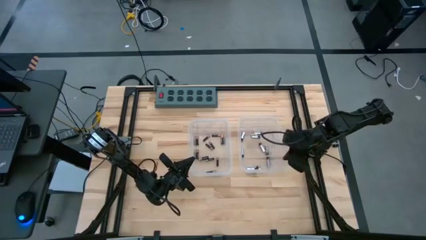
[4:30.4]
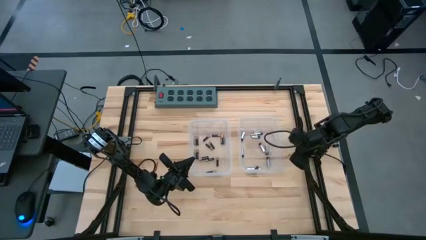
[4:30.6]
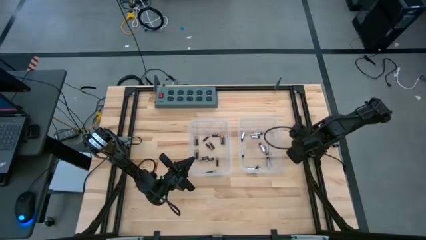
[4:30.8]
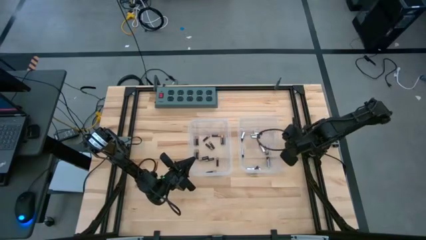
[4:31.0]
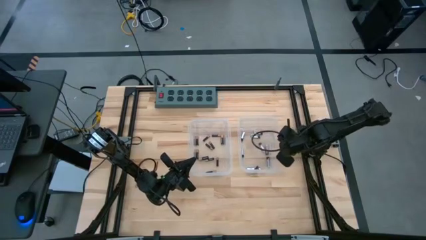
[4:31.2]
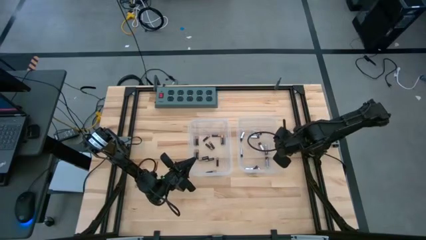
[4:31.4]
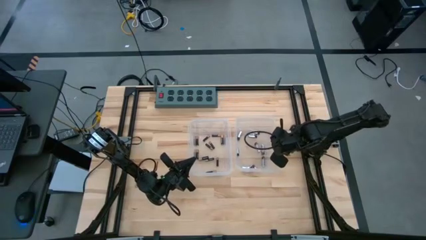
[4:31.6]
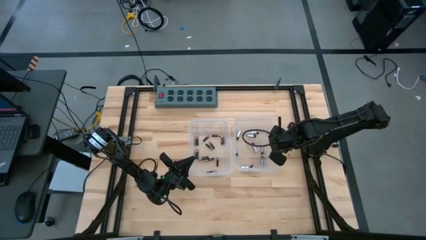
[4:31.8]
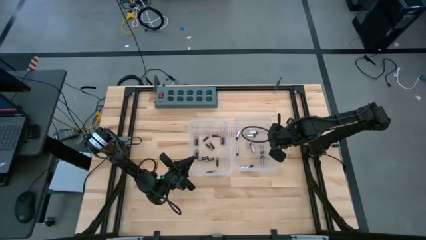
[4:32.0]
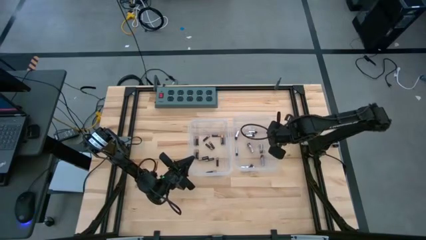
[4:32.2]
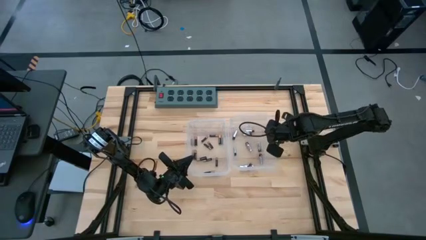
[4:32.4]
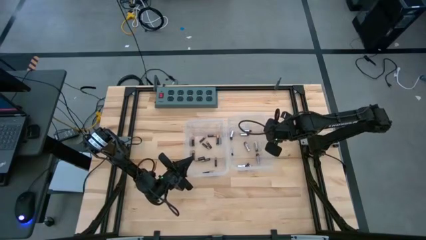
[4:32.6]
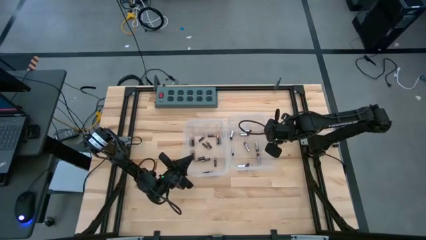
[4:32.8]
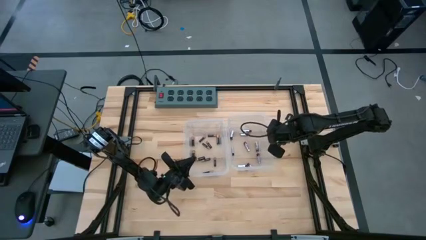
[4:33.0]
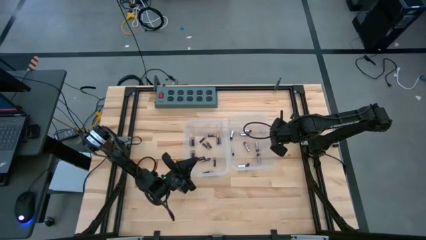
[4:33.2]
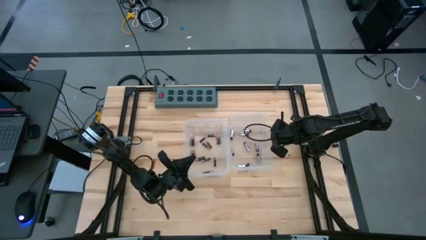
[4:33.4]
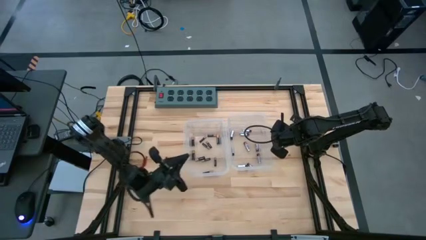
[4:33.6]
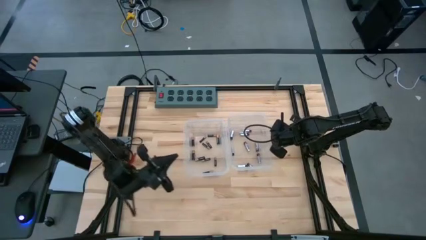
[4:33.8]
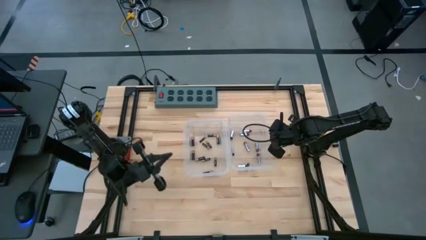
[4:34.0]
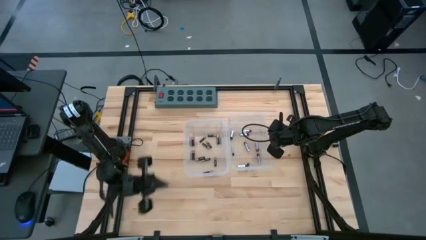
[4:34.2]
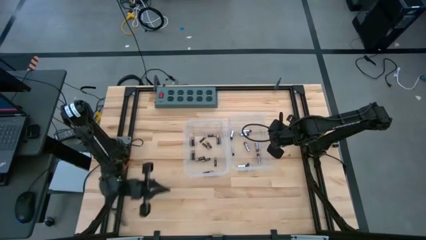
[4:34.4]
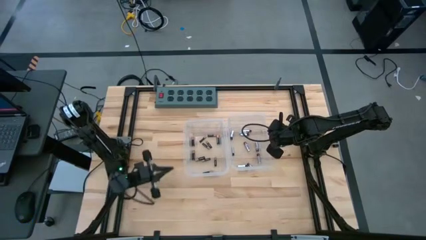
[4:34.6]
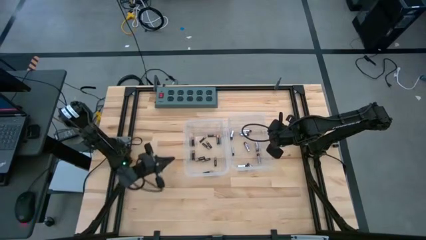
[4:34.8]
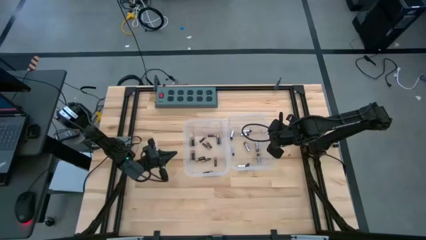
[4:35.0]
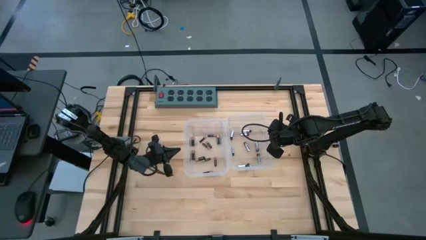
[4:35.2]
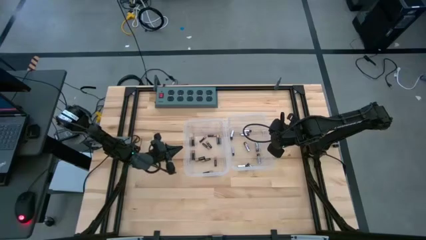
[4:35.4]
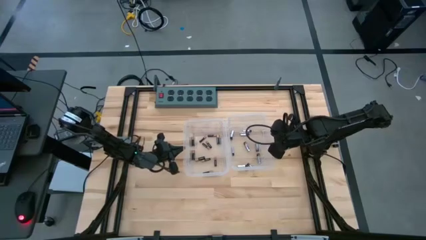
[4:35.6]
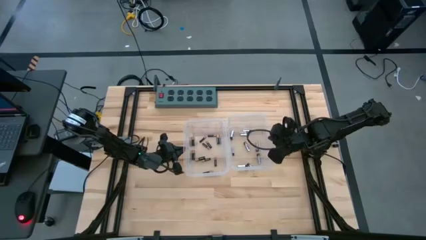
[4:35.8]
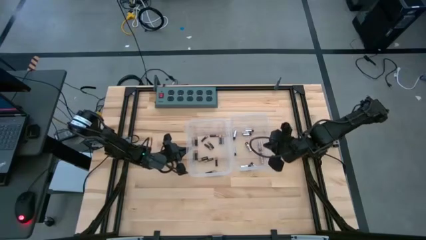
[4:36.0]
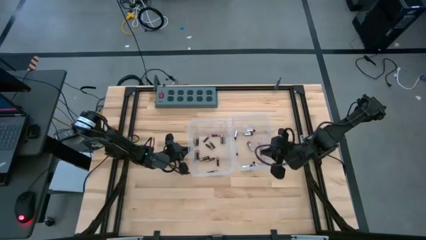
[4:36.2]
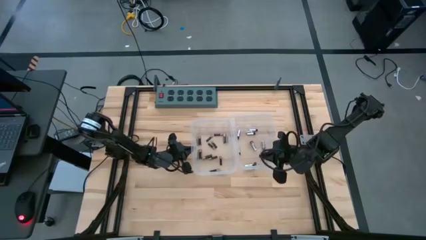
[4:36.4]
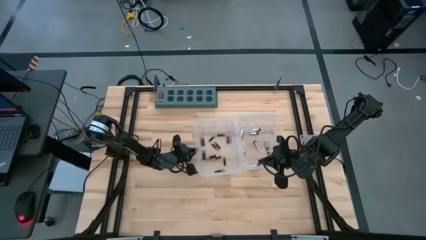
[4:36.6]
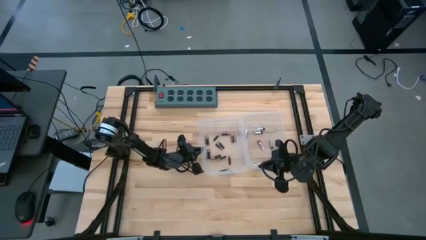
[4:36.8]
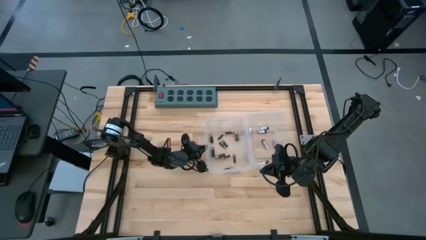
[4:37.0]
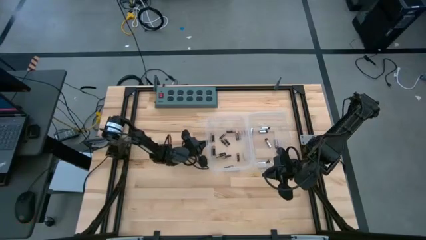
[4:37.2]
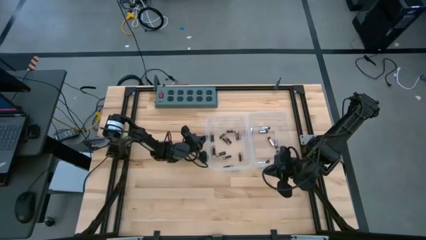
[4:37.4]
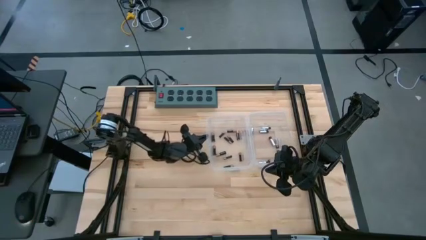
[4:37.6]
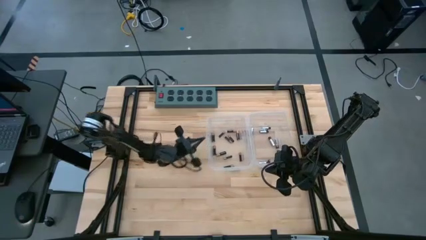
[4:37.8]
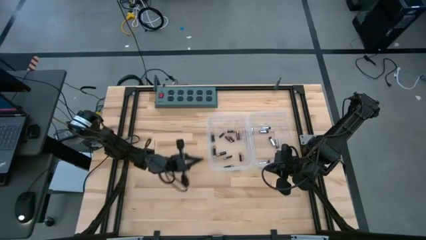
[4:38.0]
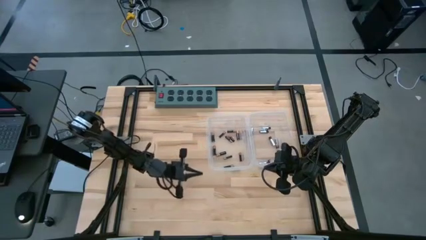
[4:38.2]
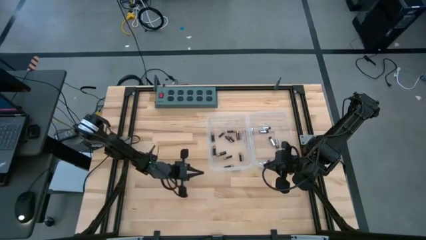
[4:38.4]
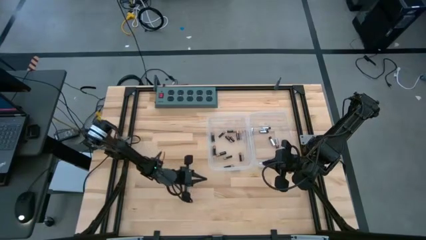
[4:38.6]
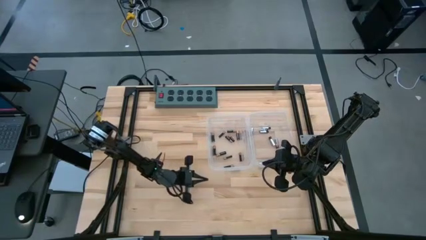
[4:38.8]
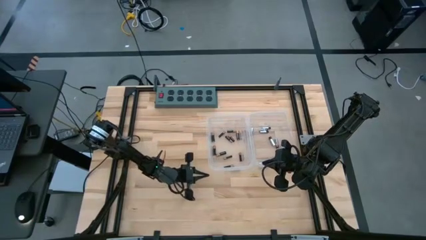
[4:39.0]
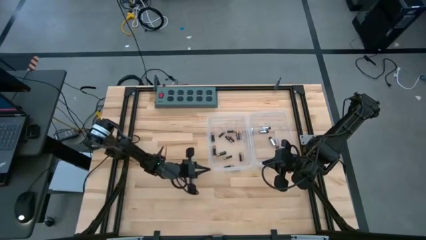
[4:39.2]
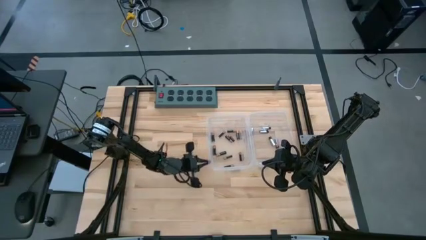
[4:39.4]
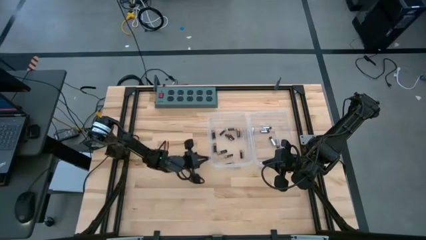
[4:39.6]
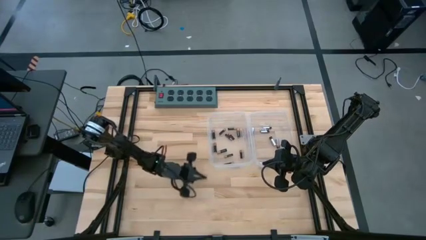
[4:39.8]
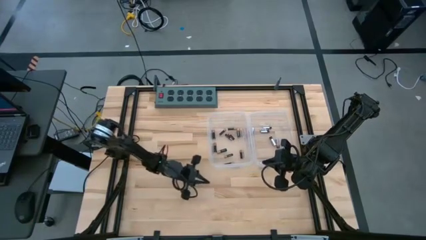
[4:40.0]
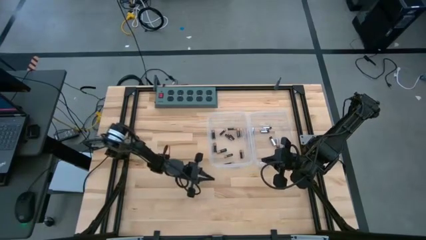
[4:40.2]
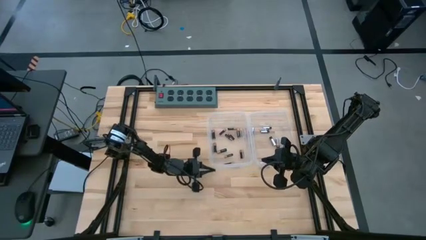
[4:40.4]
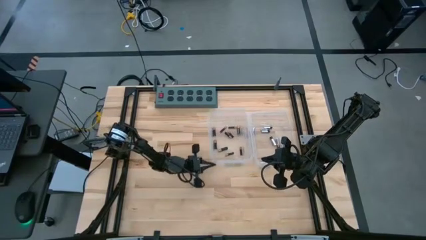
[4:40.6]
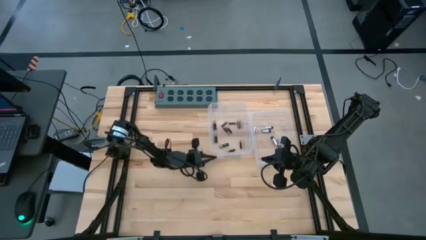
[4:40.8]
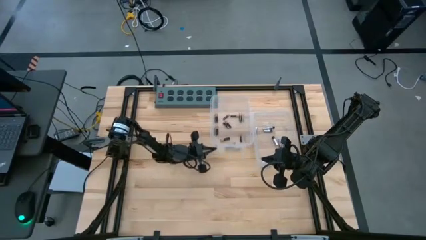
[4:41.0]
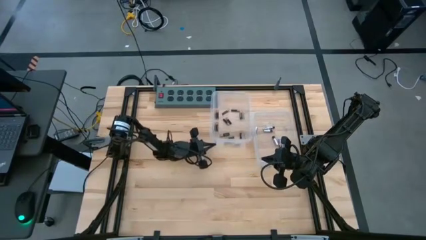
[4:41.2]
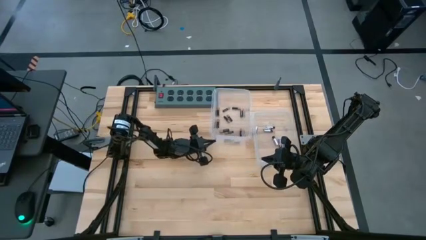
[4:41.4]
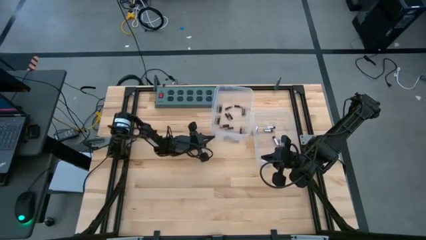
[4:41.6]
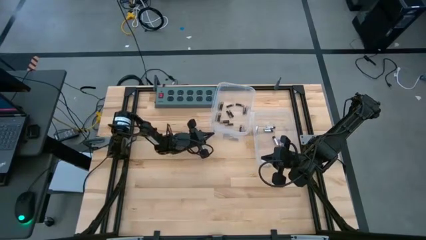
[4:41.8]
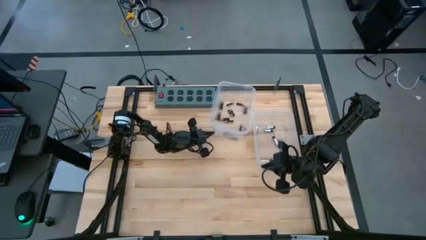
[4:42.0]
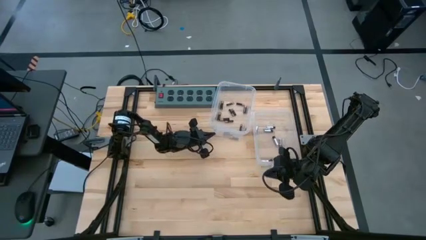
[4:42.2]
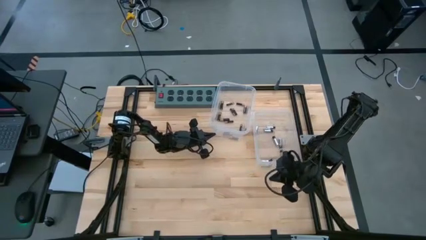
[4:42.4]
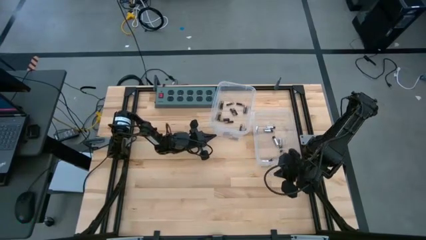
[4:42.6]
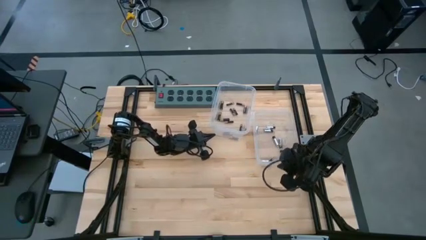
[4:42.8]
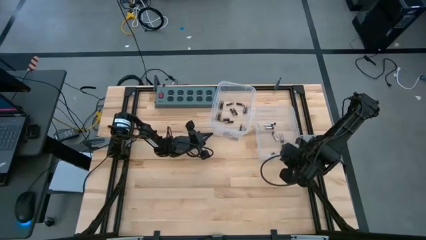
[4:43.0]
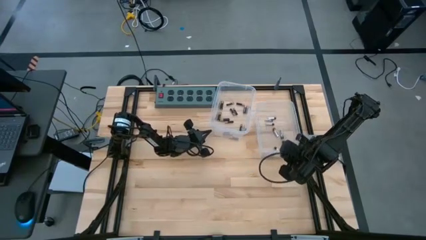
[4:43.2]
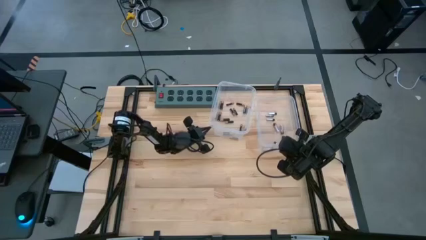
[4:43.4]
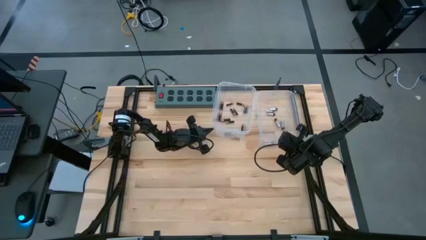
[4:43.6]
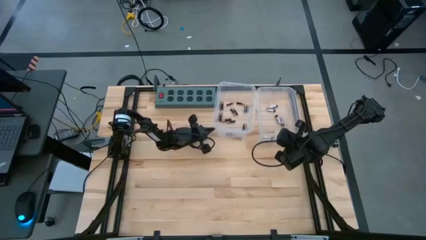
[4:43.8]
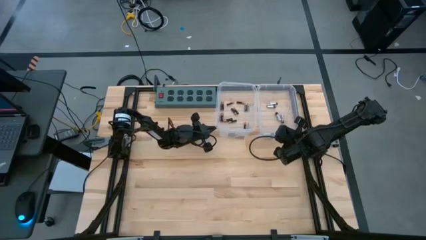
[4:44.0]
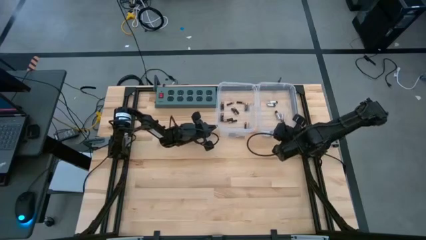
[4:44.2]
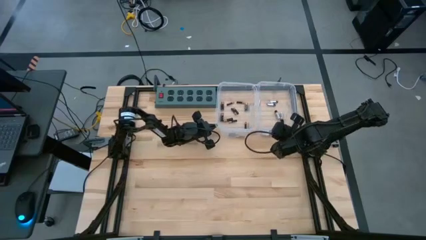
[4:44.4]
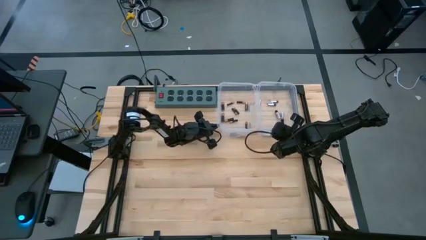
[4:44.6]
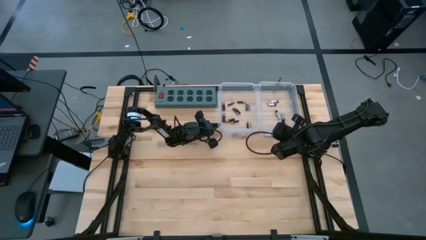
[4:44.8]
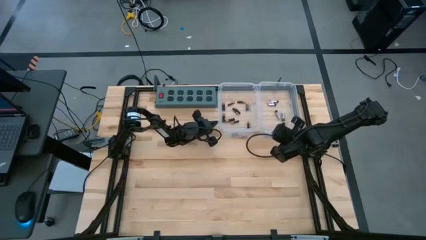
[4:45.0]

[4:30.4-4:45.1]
Task: Sort batteries
Move the transparent bins to the top right

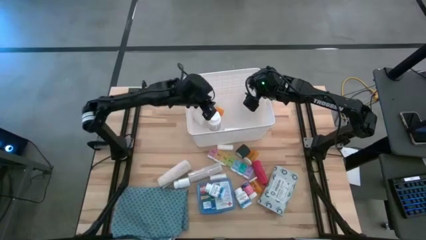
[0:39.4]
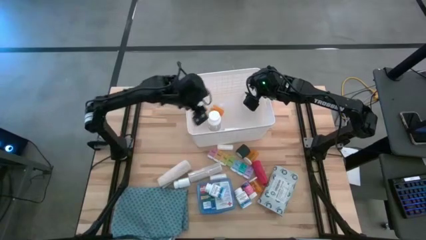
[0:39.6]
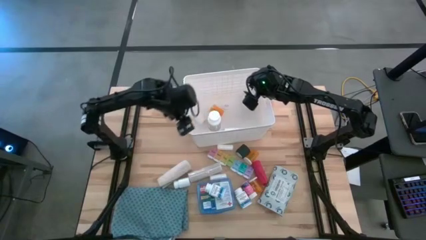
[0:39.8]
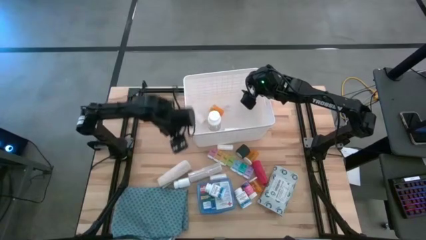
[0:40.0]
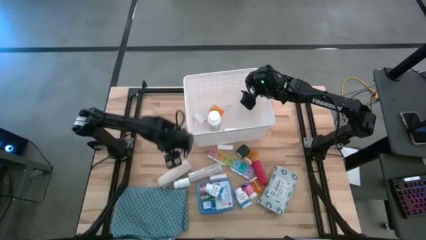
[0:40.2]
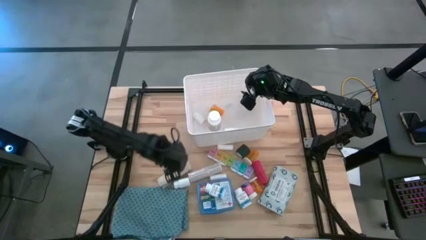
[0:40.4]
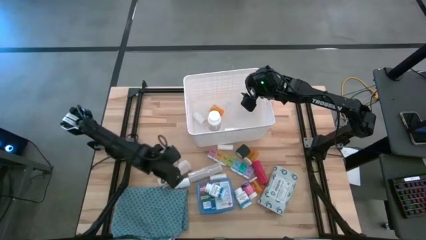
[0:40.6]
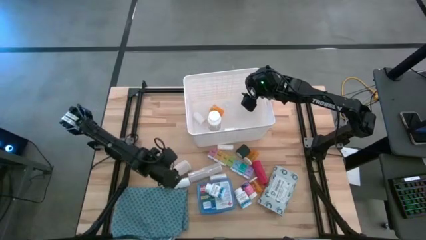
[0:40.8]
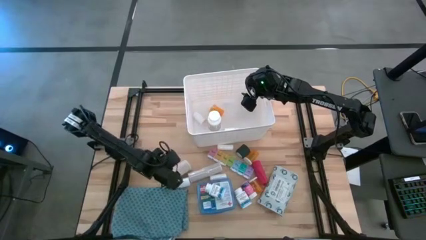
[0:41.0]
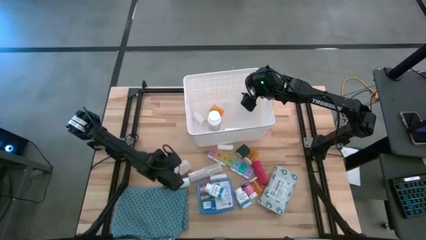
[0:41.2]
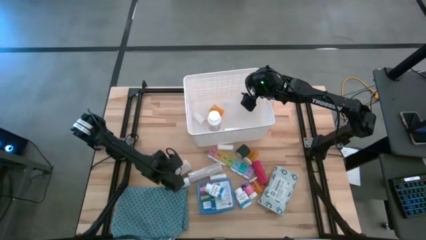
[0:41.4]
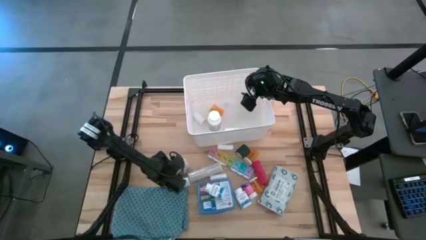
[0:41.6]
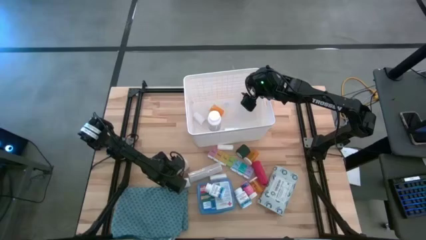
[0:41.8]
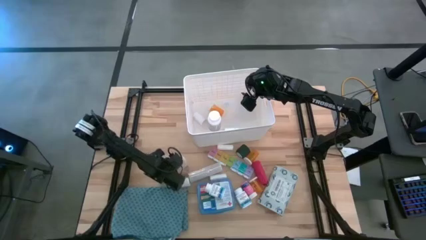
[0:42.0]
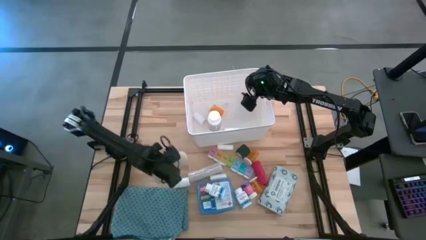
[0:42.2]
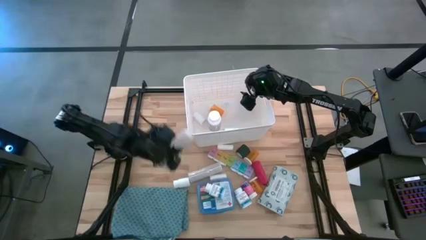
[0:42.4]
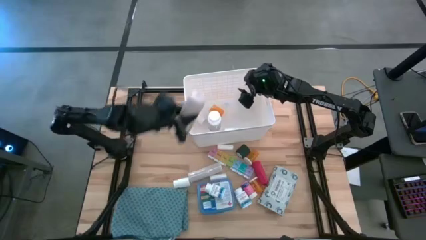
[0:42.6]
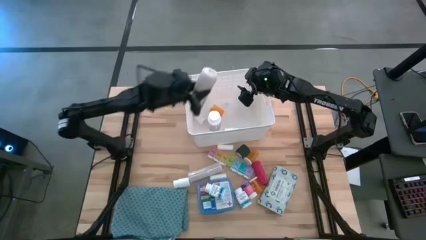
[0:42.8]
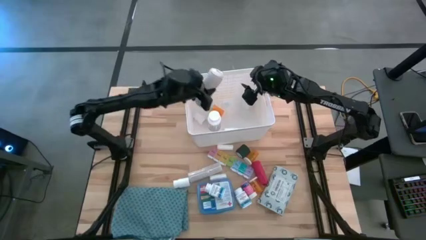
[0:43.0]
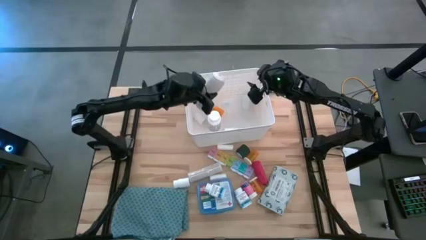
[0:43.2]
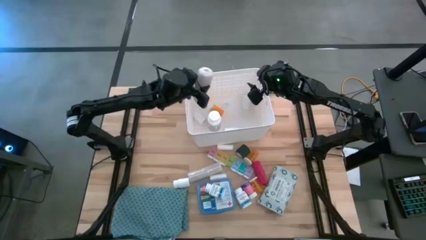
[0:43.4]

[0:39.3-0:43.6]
Task: Pick & place medical supplies in basket/bin
Put the white bandage into the bin
